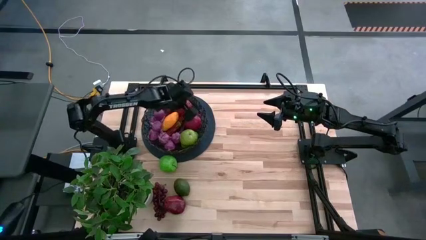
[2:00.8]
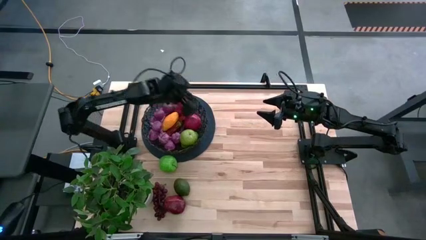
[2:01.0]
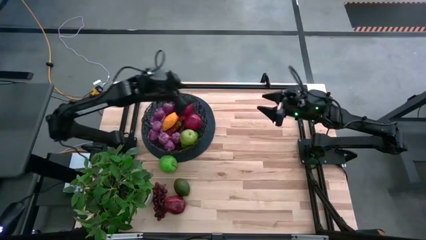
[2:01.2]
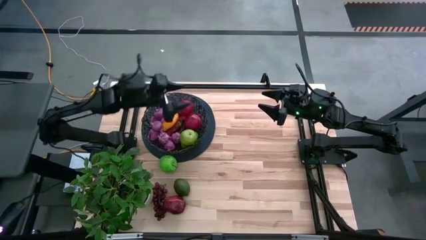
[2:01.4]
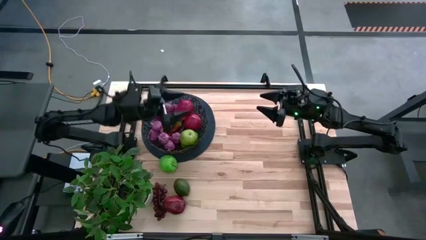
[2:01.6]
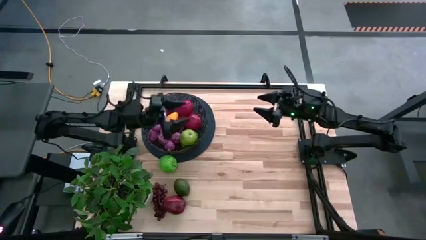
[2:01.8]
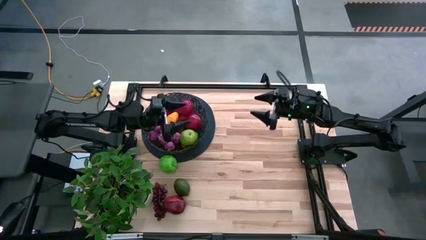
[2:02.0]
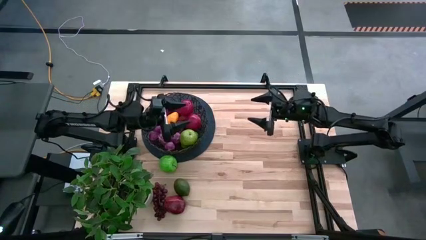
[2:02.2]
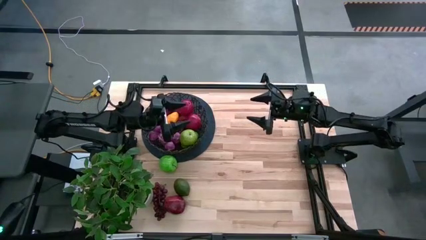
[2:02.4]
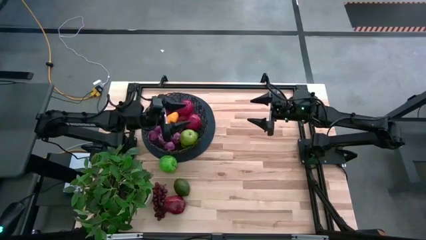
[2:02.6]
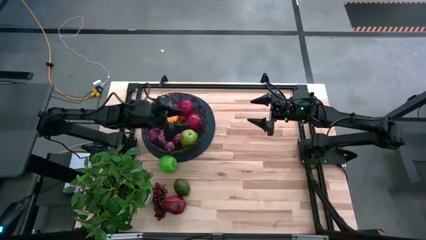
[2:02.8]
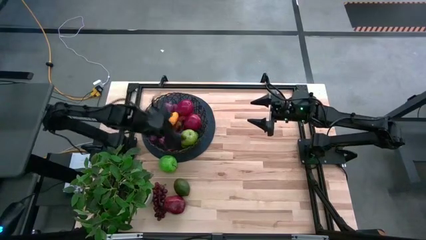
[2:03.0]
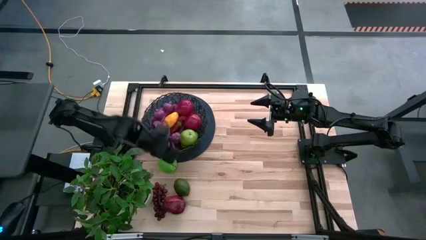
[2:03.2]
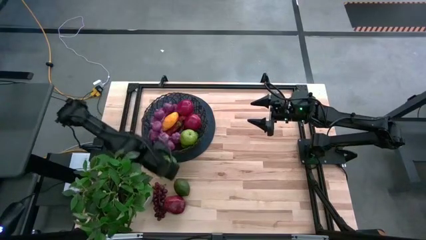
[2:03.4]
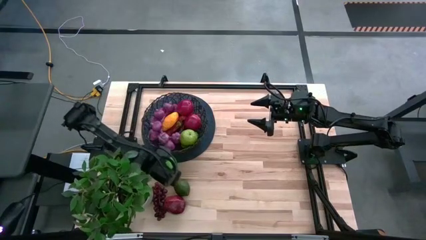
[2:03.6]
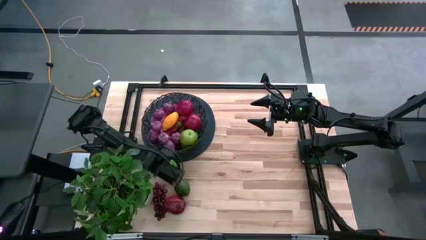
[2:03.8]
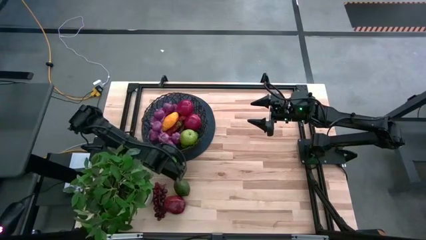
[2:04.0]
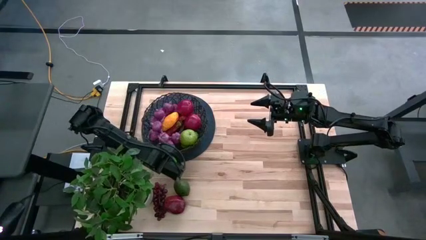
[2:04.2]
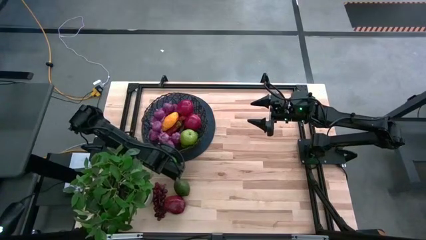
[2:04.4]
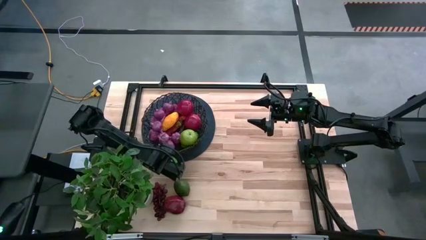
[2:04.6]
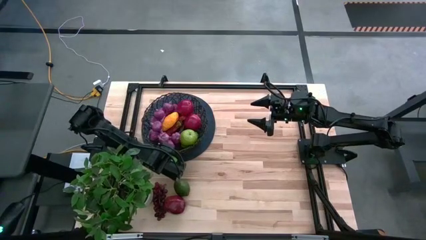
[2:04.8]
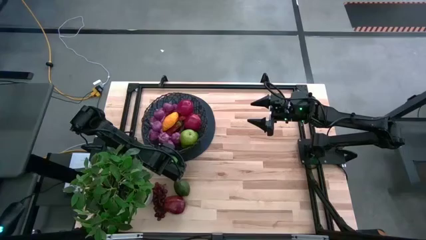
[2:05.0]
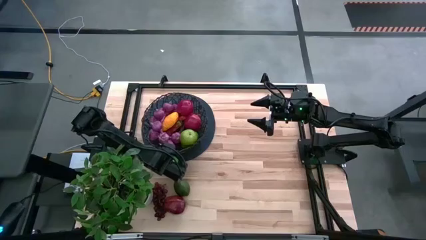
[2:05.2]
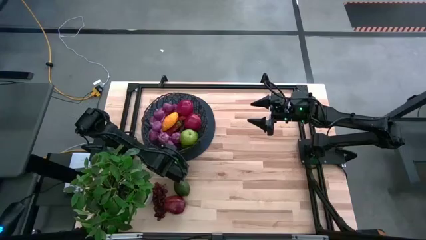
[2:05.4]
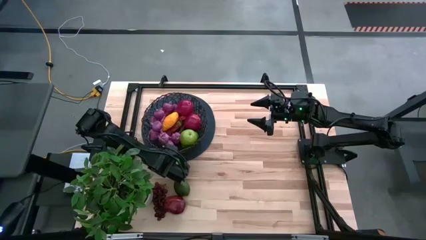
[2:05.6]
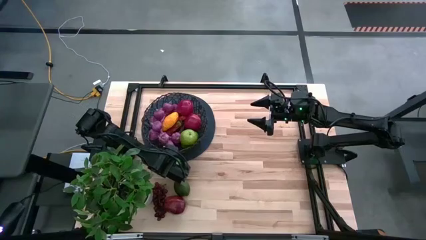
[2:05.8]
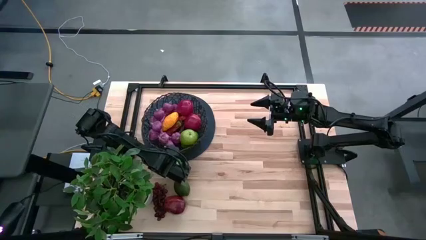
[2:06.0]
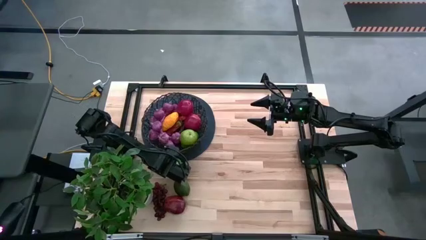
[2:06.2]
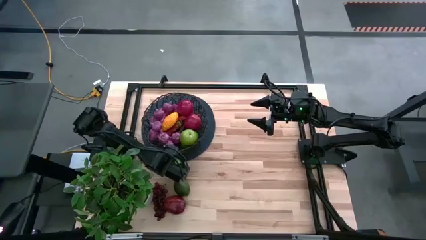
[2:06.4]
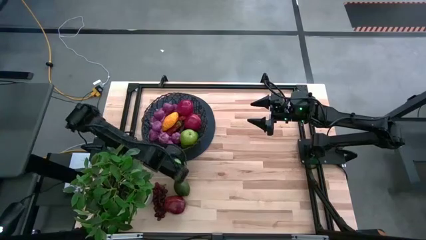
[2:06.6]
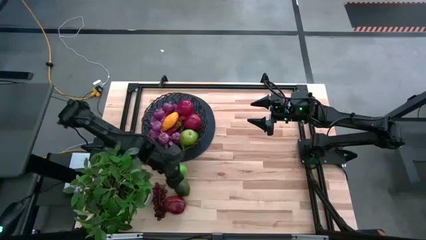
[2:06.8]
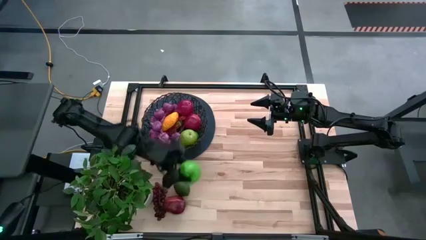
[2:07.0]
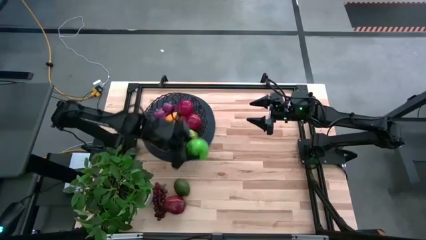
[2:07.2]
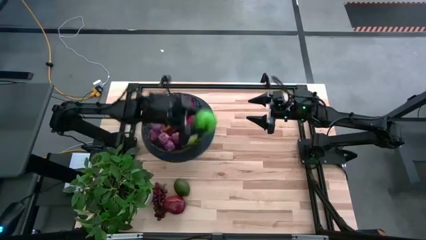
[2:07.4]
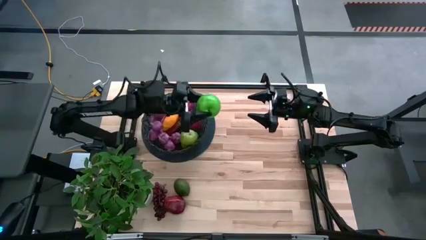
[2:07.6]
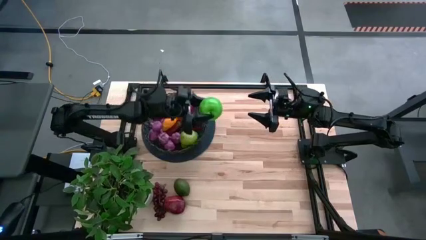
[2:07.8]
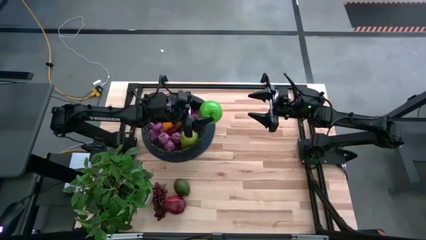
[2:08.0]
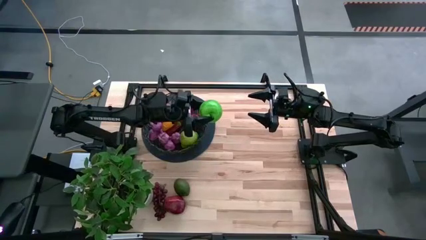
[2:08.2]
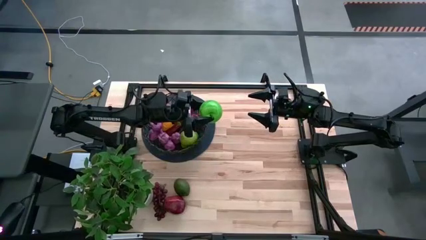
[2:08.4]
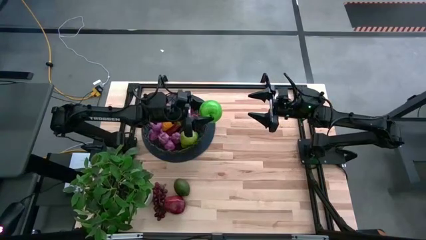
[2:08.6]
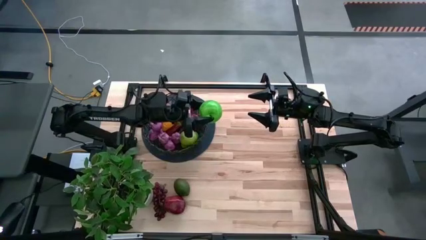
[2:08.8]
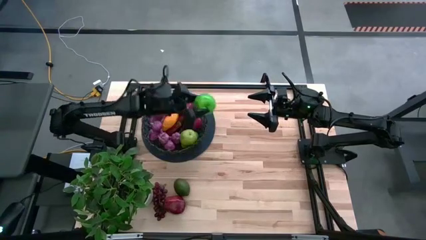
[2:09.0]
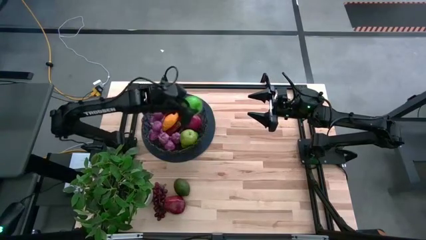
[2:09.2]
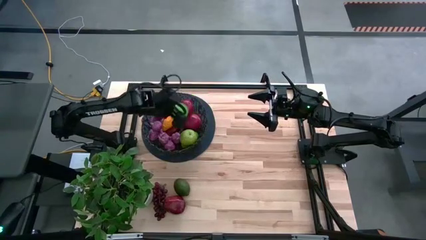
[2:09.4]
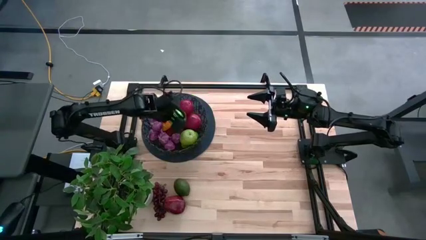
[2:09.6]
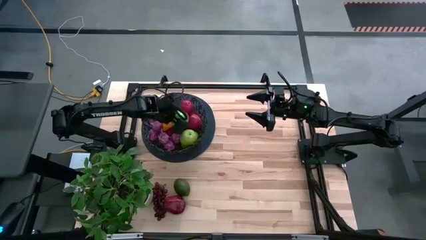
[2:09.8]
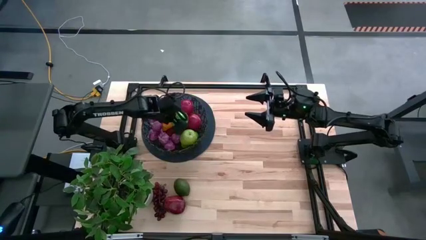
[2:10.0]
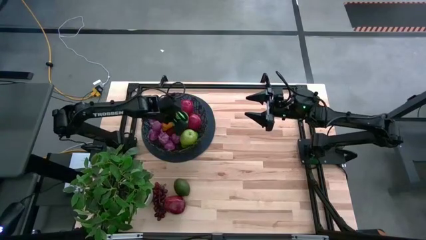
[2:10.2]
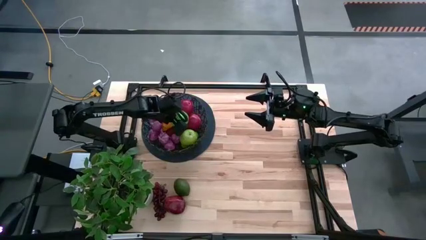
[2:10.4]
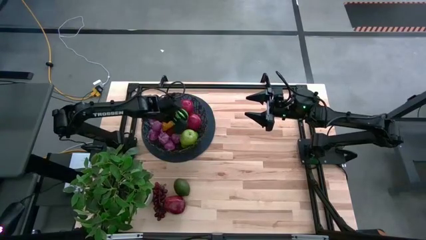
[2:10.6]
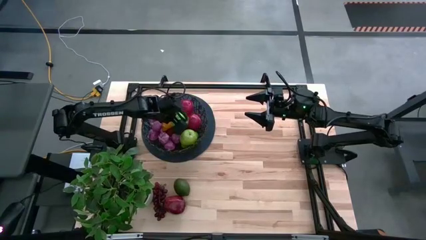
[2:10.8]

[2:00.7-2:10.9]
Task: Build produce basket
Put the green apple into the wire basket

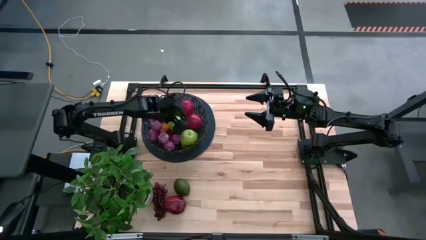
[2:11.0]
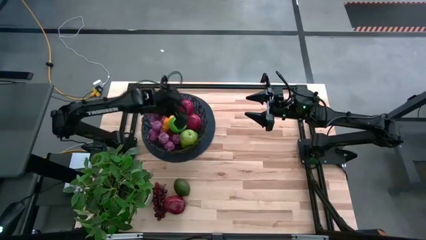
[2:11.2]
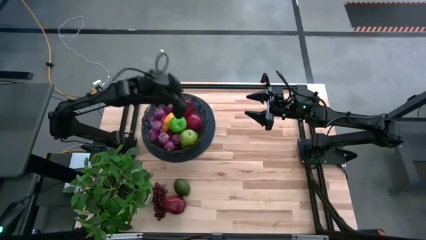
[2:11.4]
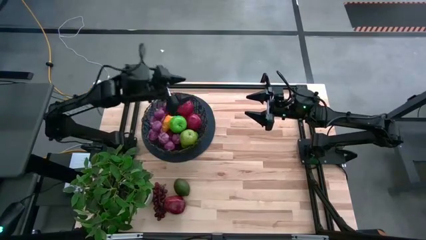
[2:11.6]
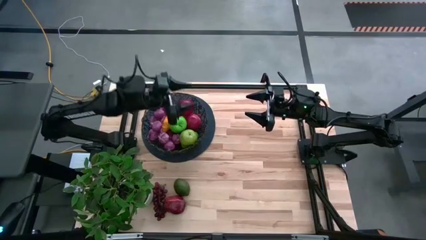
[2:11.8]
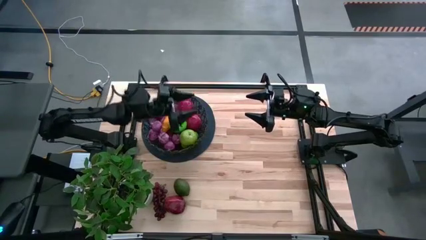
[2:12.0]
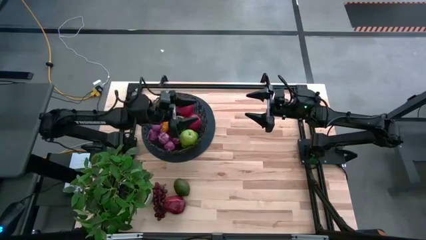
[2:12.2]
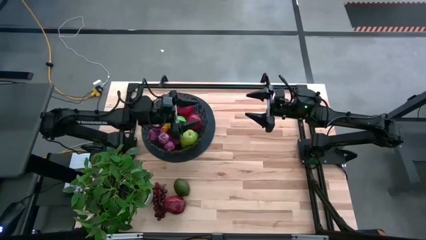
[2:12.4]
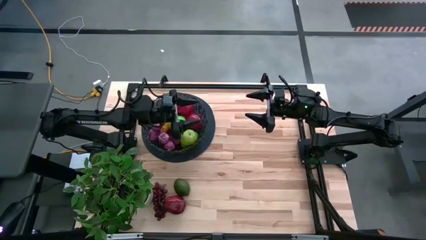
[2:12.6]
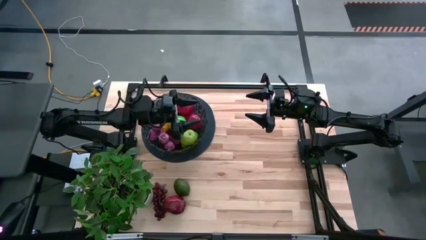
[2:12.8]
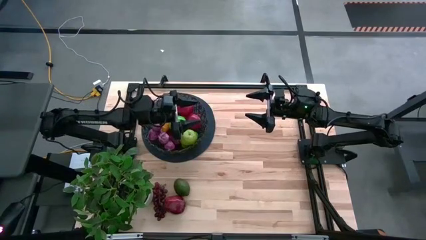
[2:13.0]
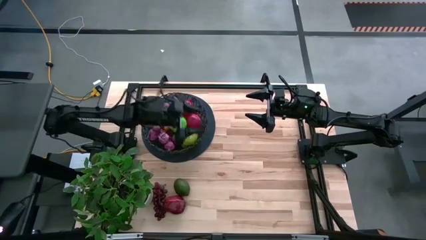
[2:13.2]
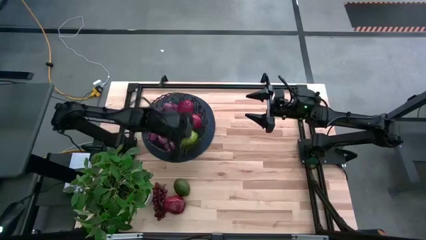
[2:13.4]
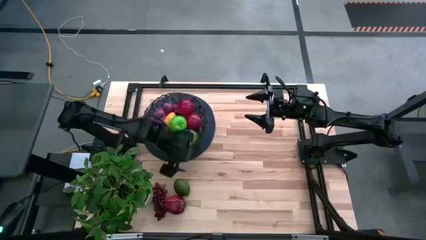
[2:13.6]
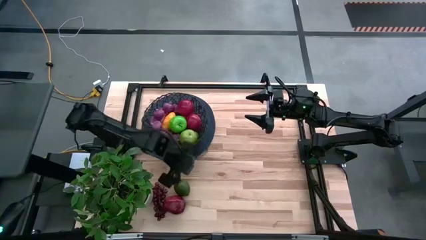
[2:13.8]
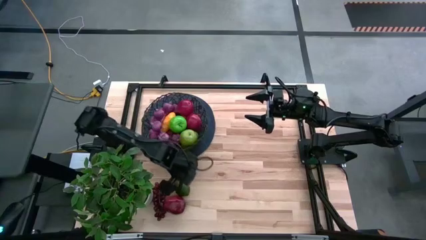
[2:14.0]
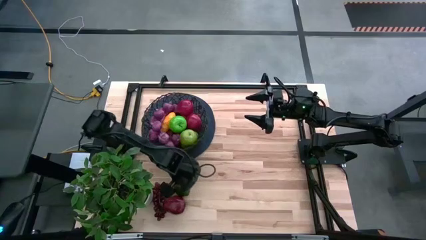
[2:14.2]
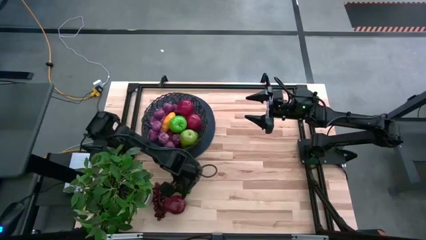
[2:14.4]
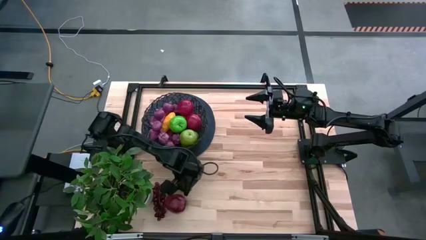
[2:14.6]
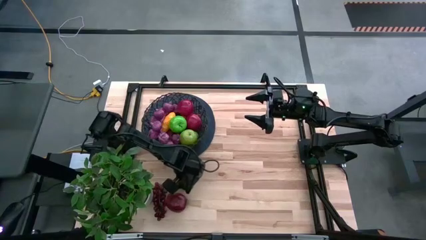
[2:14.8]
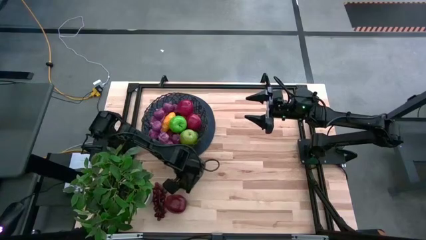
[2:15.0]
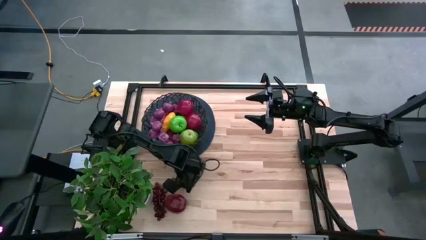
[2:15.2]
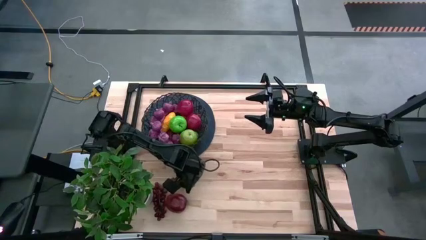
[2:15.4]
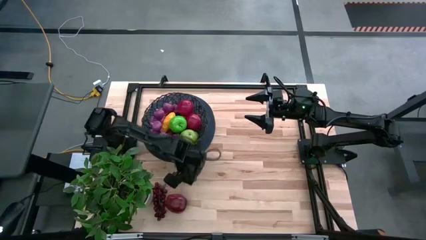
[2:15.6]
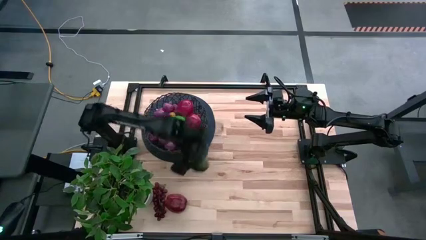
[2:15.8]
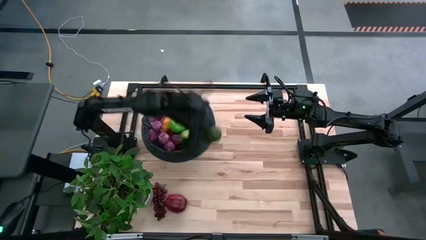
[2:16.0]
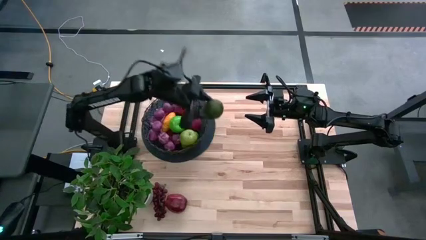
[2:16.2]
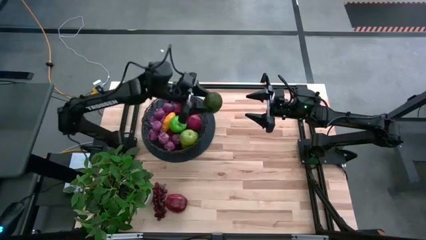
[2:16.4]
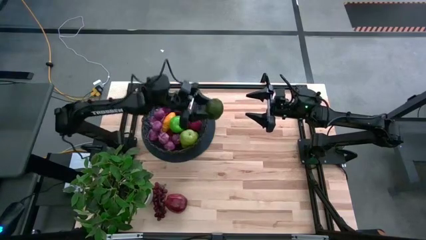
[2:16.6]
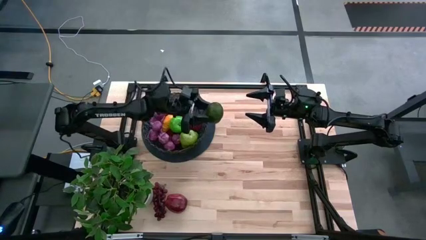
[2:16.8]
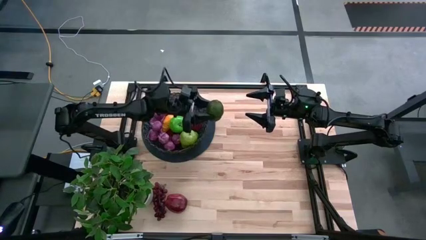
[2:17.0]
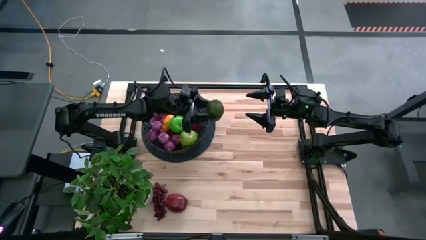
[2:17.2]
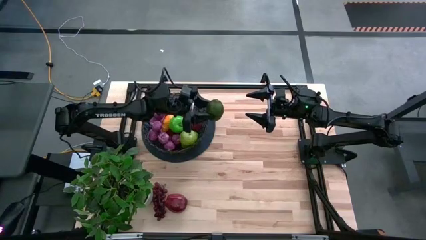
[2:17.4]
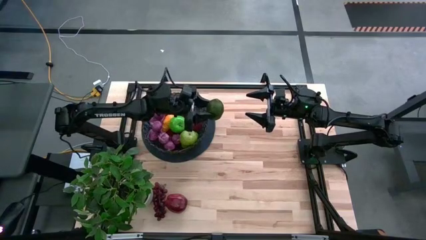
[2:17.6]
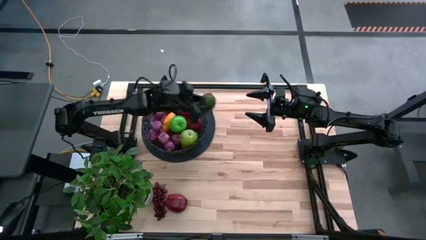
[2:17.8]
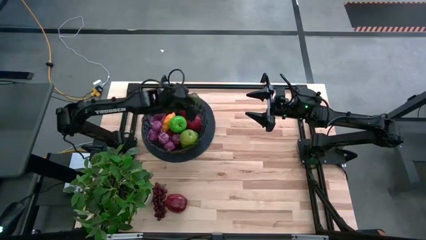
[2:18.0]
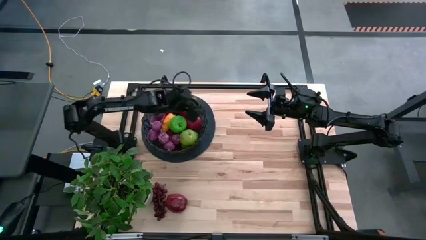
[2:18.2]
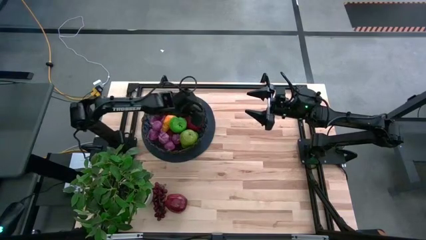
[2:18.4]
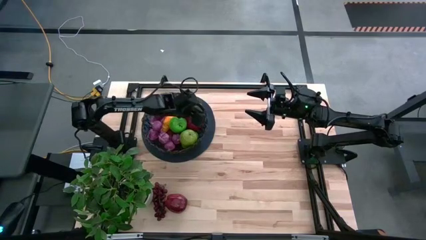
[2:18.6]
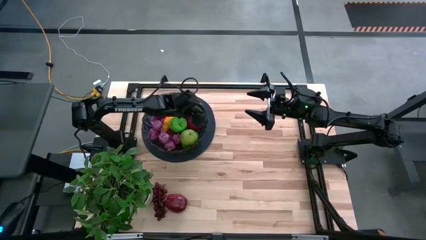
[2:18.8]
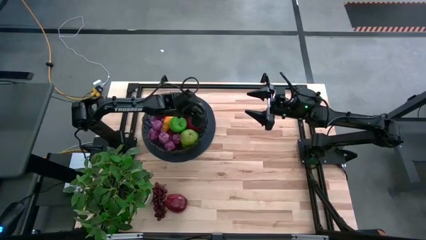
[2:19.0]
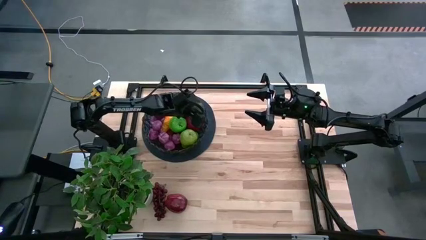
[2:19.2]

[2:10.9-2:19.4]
Put the lime into the wire basket
